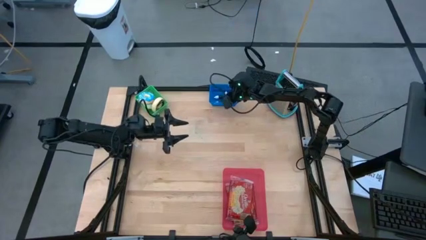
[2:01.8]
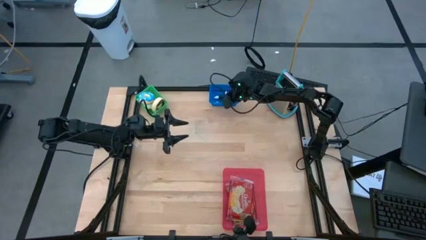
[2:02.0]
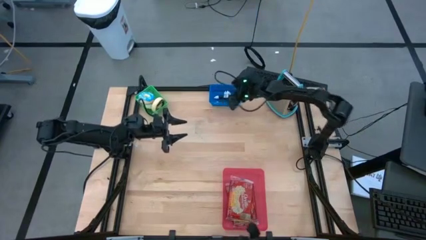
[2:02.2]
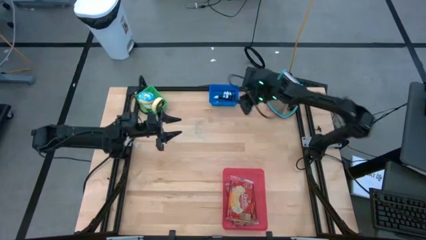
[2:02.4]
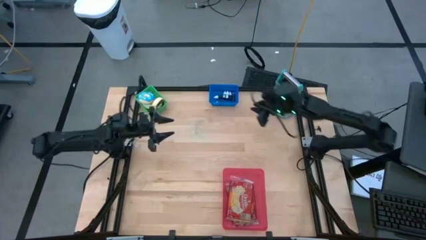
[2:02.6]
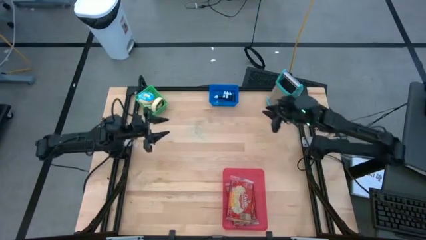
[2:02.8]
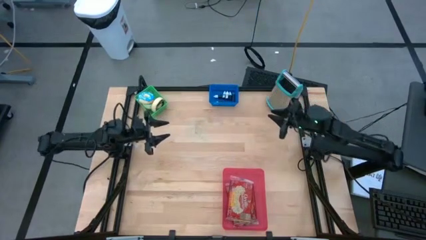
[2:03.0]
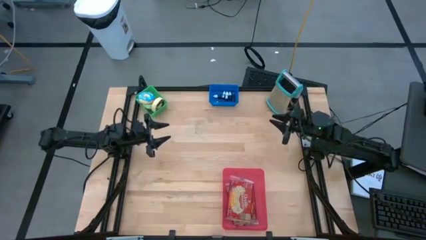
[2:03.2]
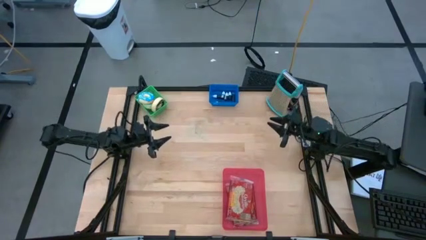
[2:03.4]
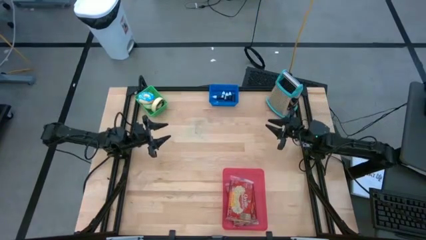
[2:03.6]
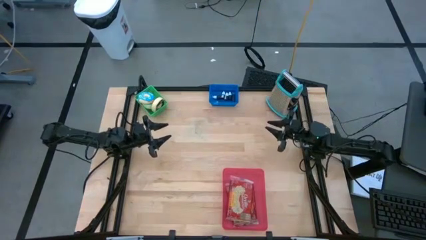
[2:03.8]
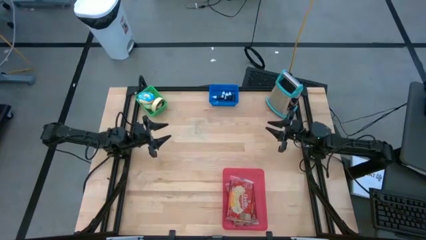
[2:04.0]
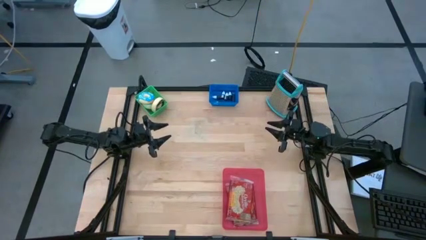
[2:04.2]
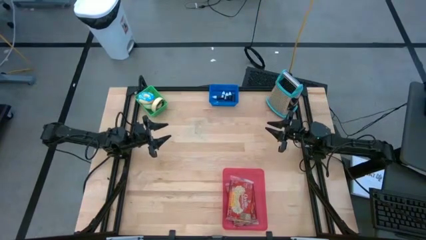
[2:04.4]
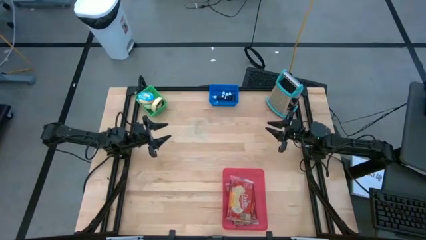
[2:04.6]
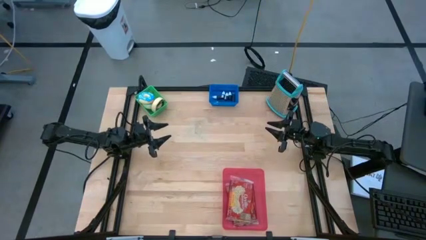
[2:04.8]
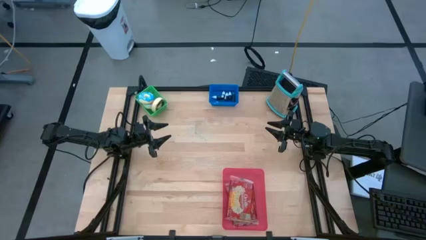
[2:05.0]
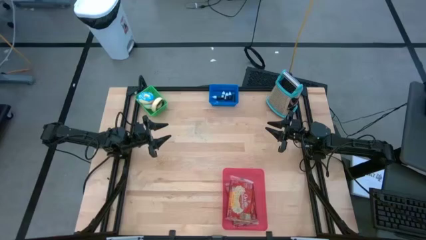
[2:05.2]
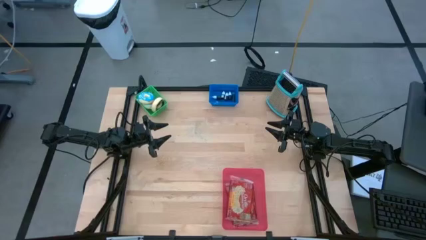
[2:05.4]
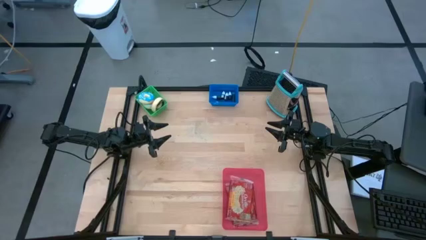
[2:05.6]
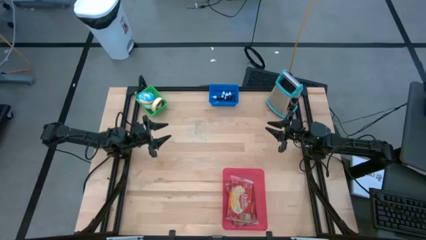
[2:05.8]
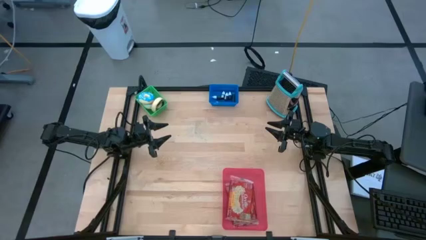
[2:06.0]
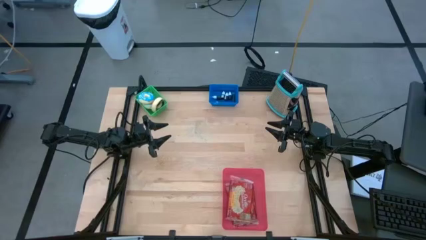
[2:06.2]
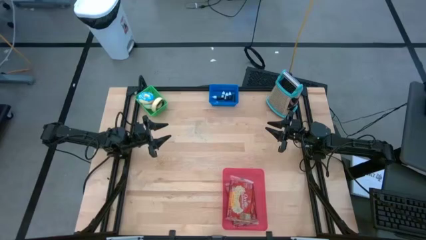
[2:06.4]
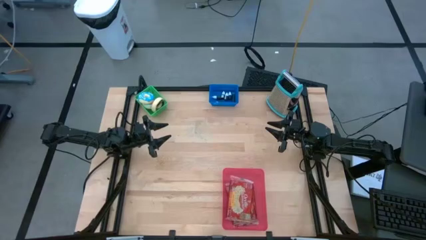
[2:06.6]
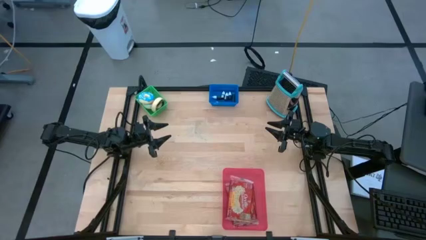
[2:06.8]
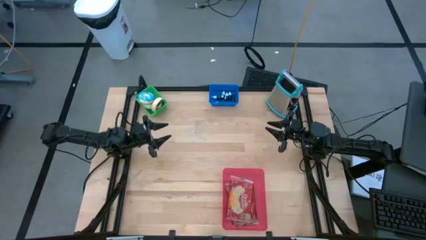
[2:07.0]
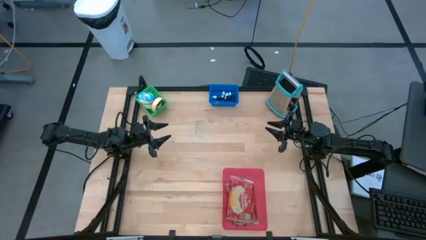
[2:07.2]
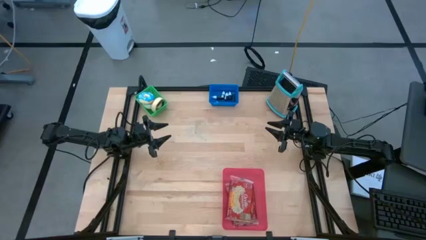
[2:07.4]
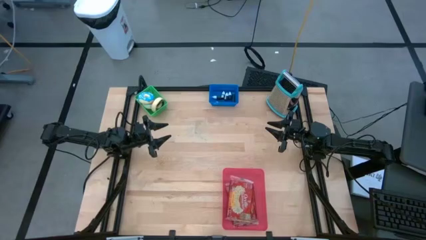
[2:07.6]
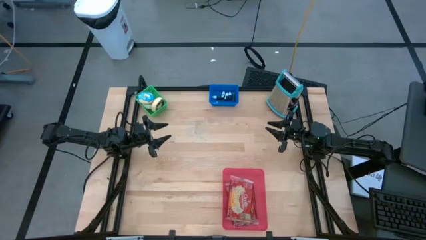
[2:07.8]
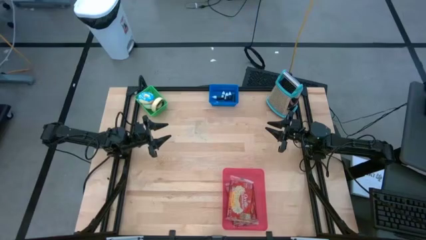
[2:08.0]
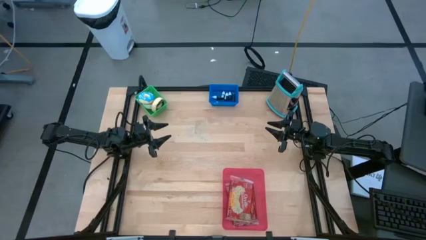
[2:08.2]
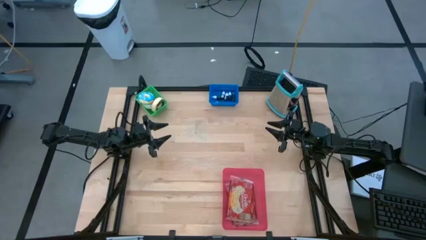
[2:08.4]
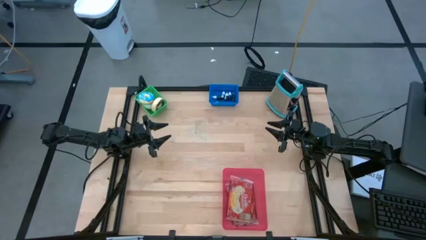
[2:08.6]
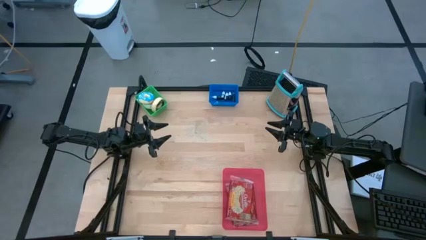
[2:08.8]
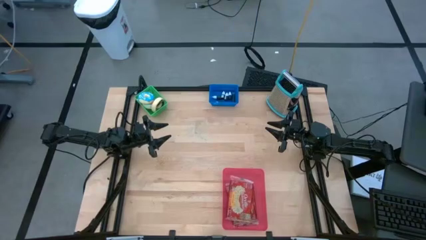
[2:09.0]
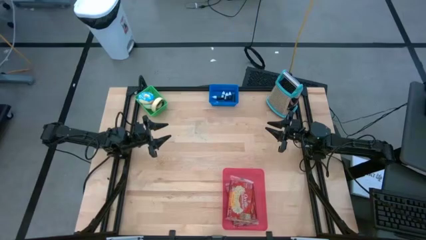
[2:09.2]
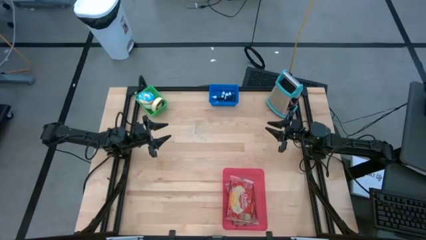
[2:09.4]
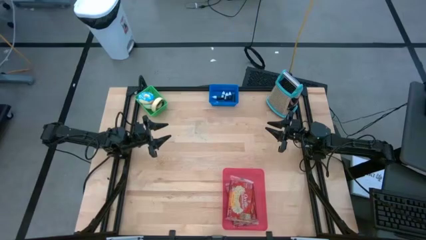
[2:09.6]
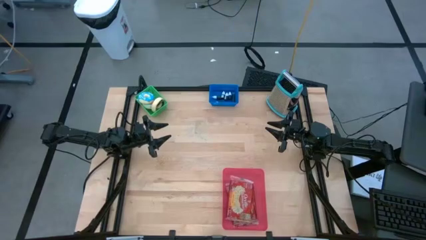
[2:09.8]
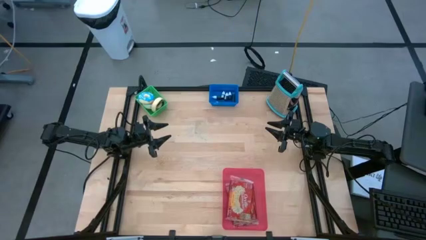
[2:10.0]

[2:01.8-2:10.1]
Return to Home Position
